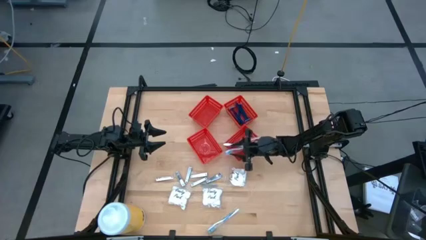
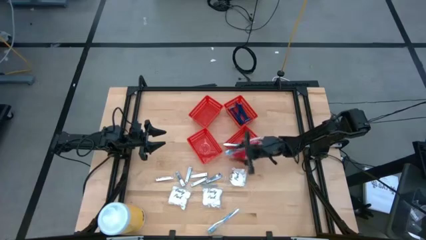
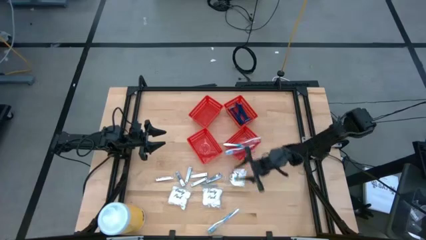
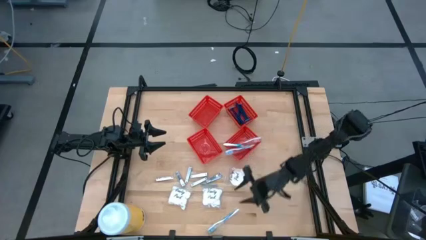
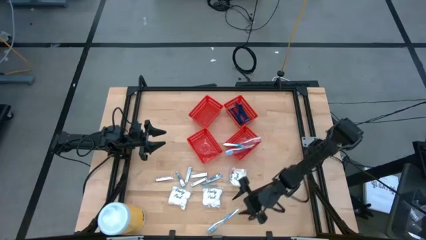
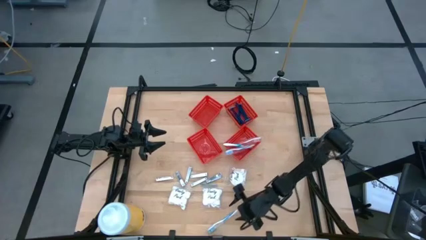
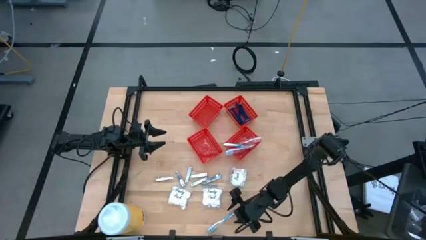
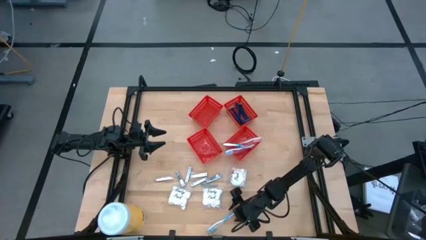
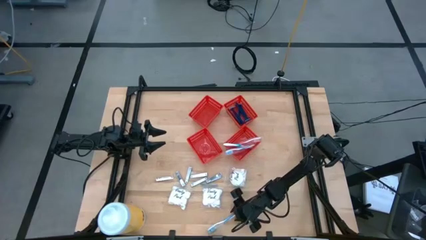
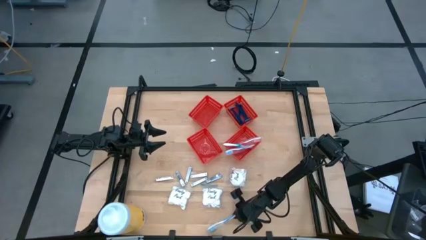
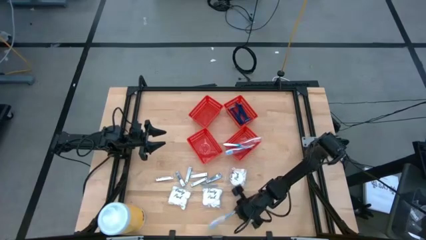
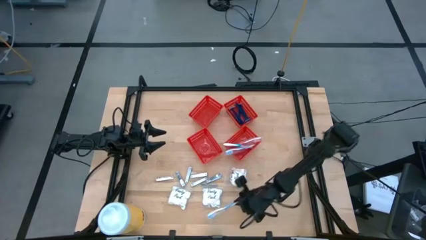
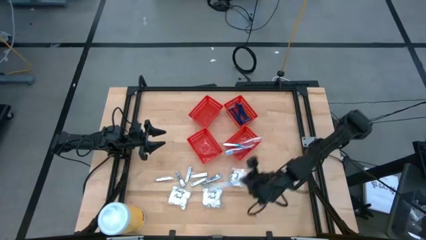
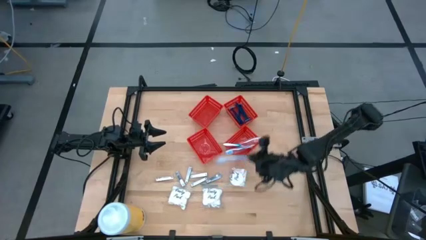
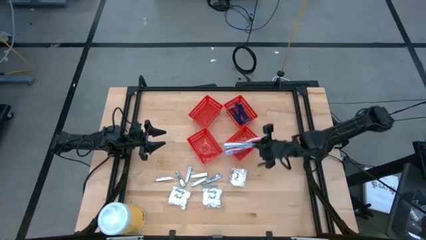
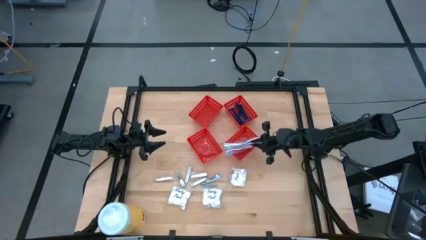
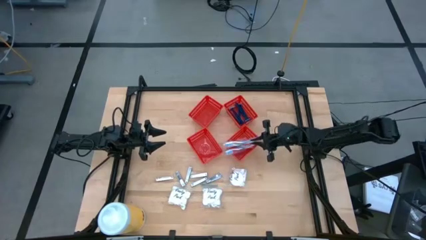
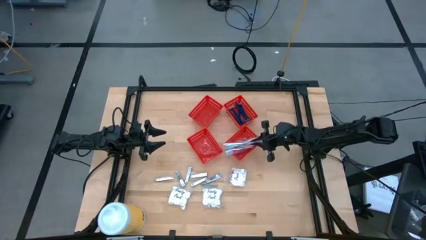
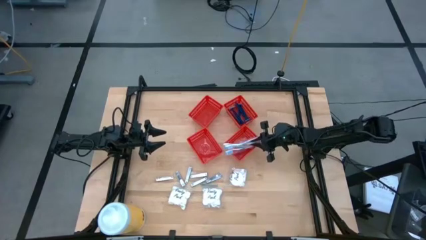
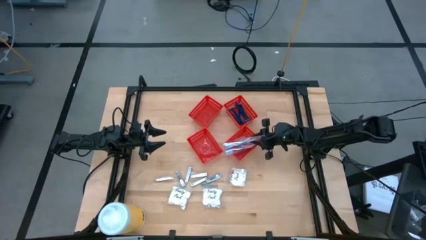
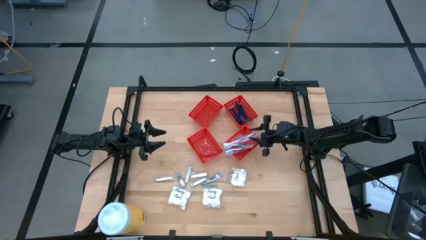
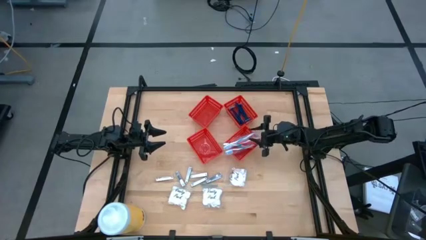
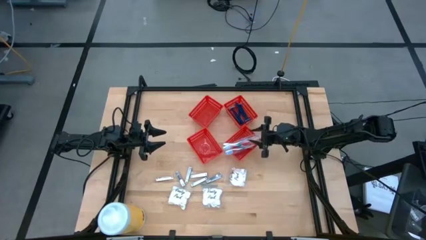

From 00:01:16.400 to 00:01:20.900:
Task: Pick & Place Travel size toiletries
Put the blue toothbrush into the bottom right red bin

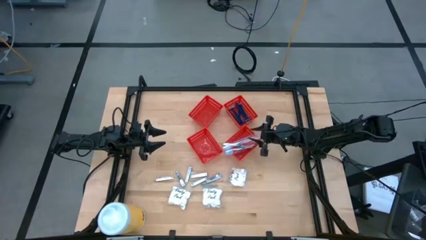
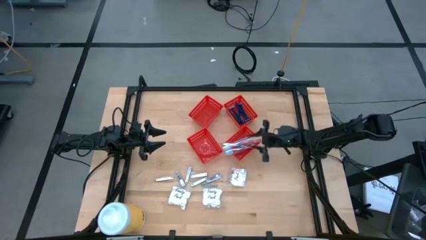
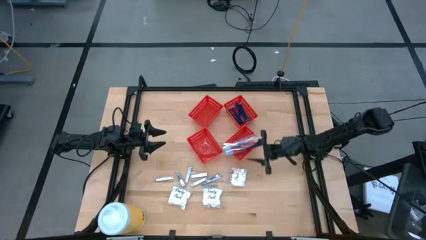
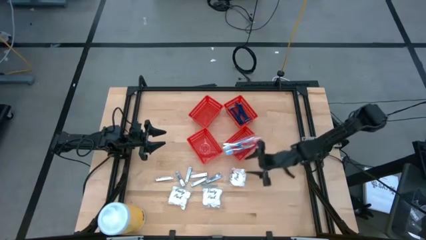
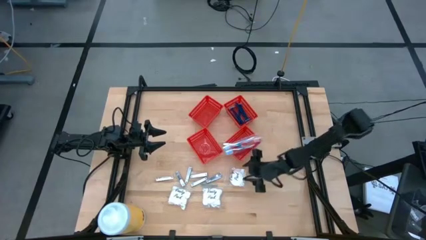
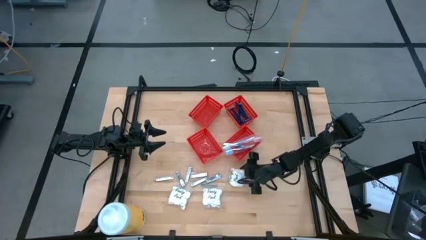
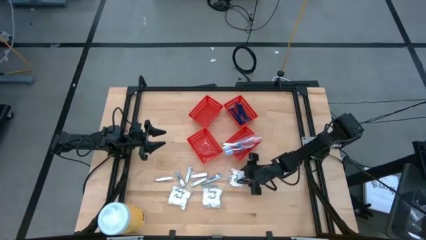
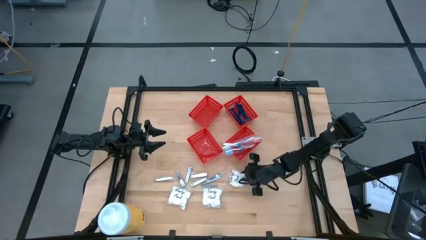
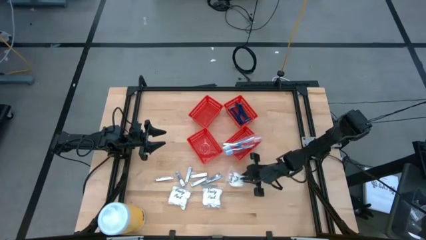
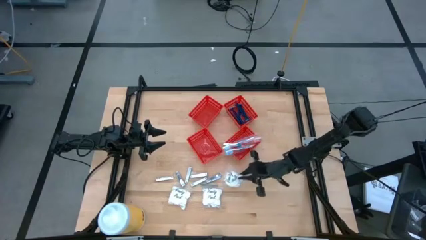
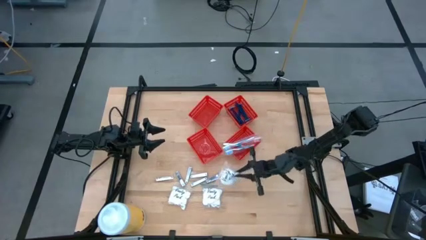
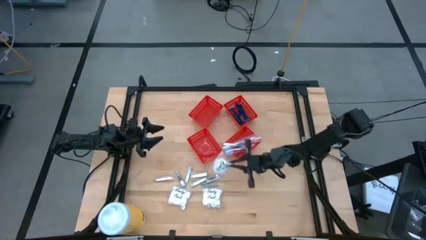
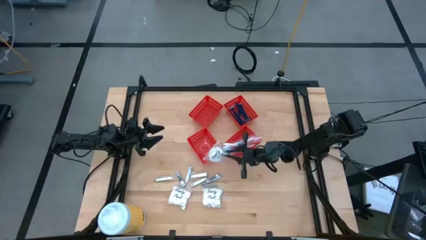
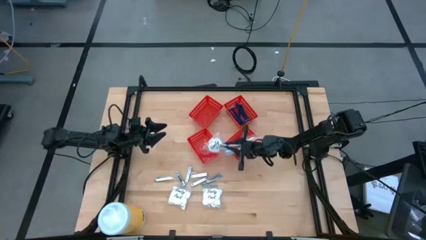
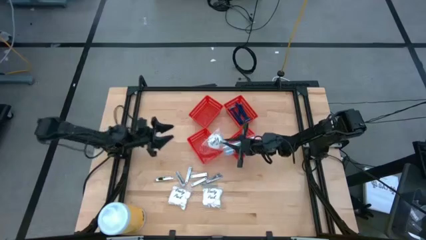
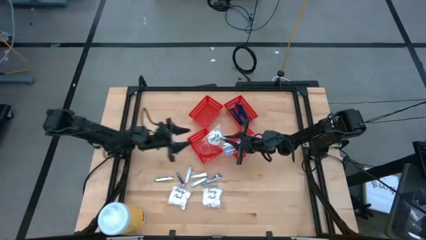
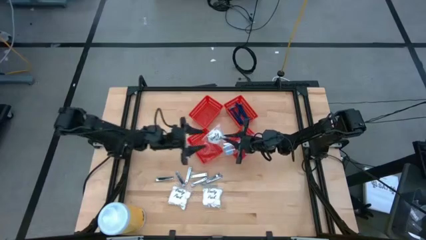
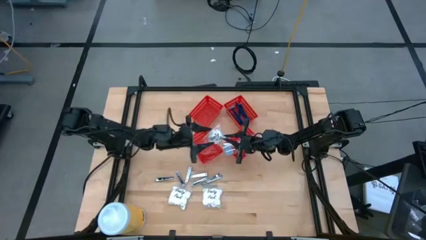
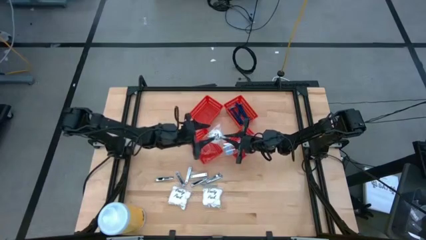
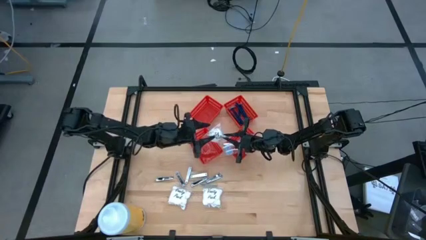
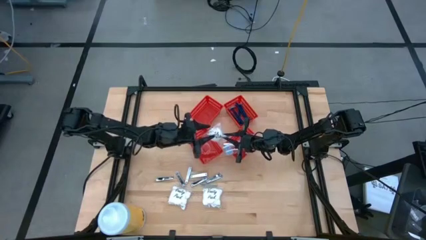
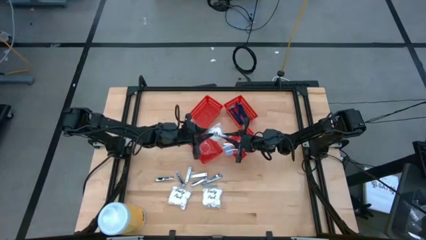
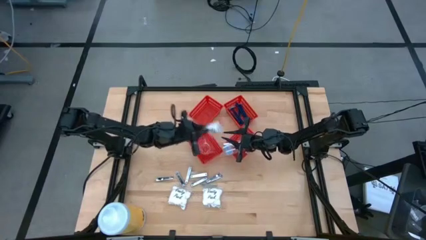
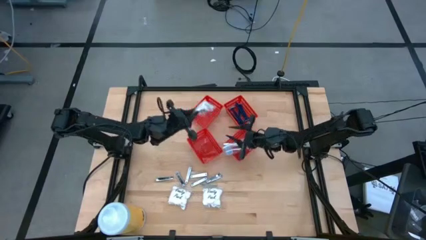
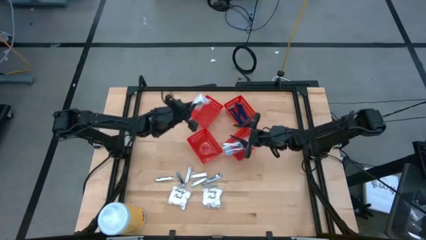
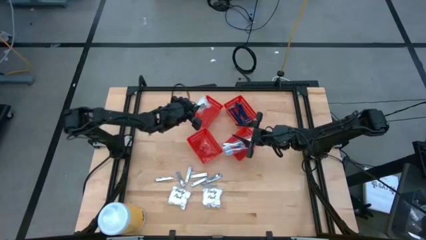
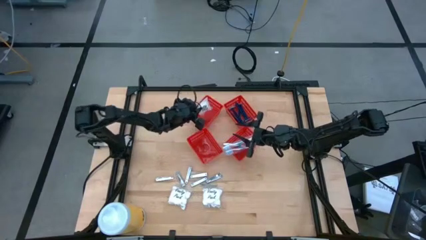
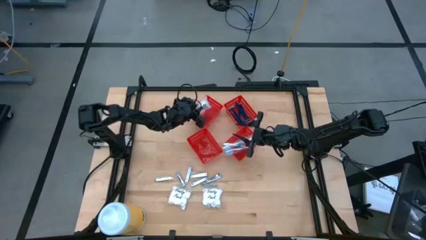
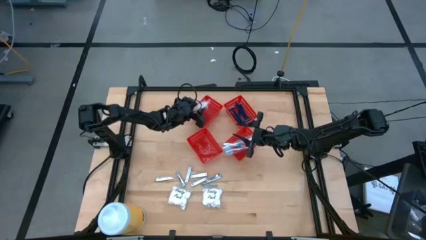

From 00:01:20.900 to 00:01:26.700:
Put the transparent cotton pack into the top left red bin

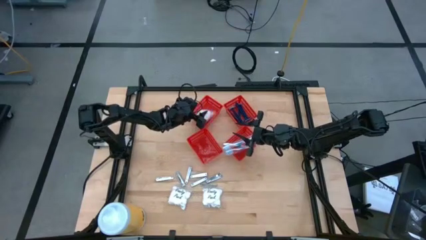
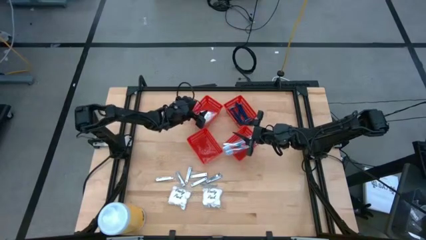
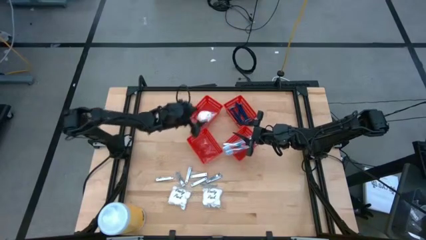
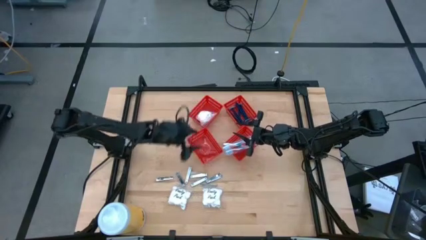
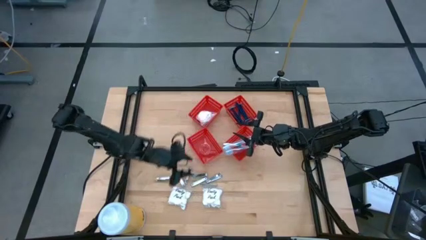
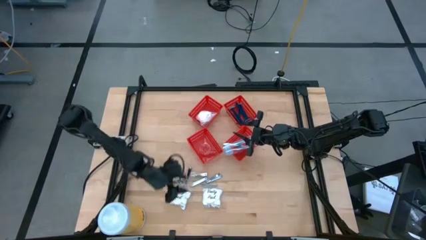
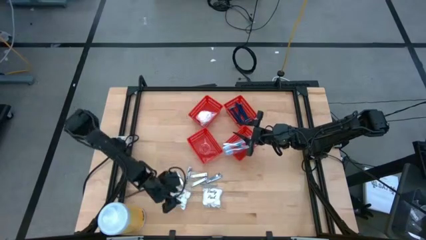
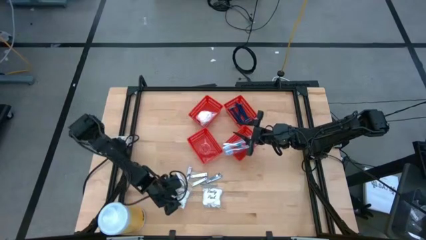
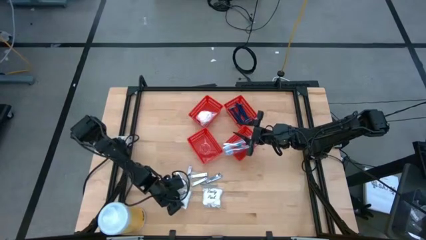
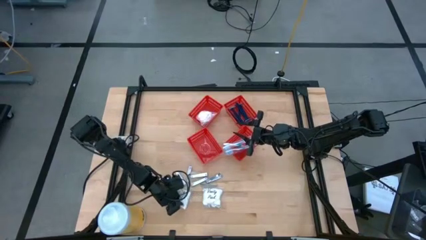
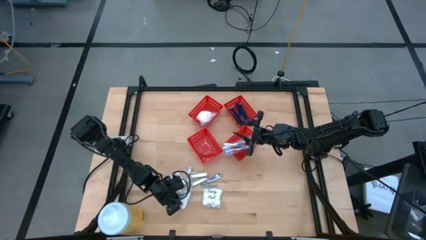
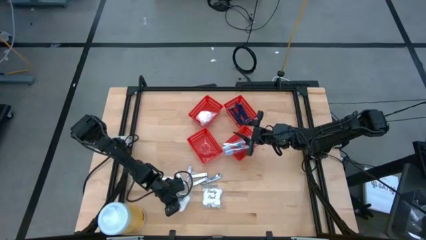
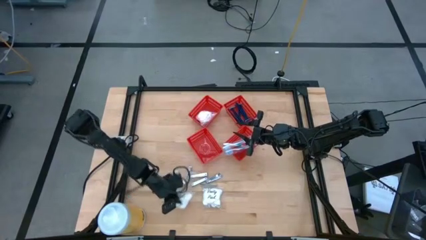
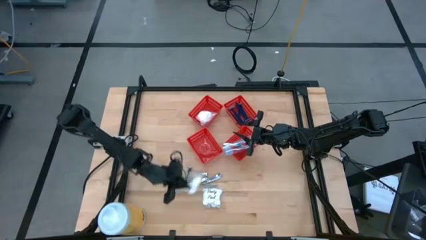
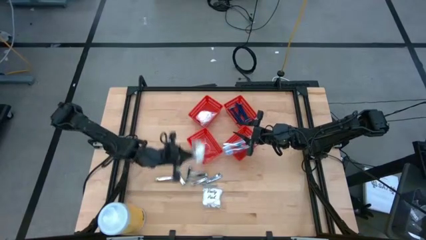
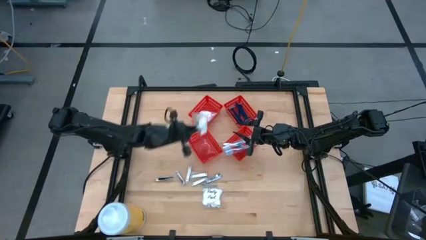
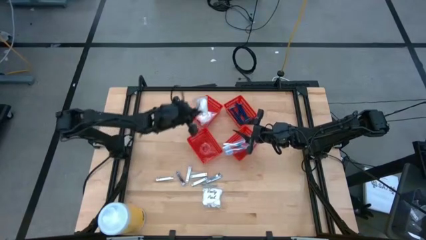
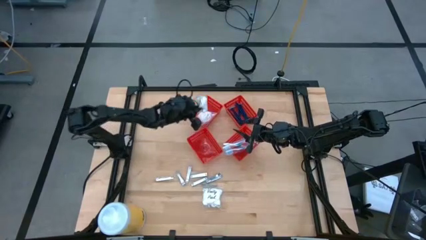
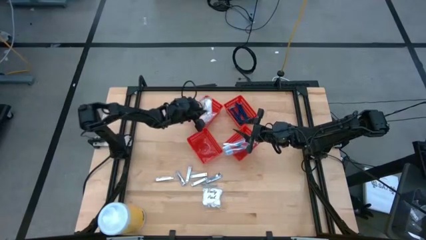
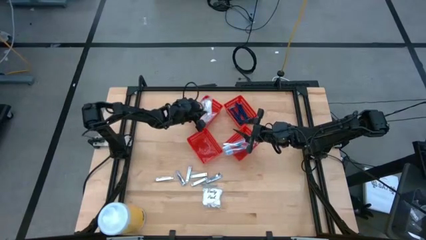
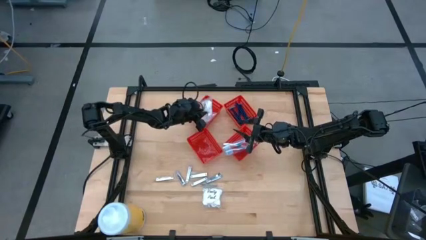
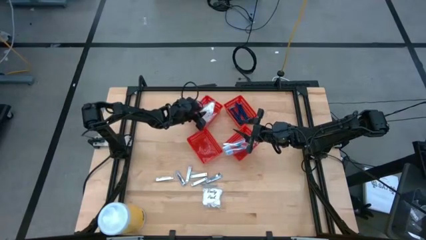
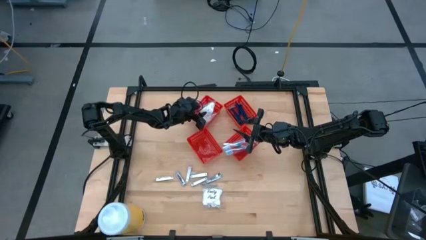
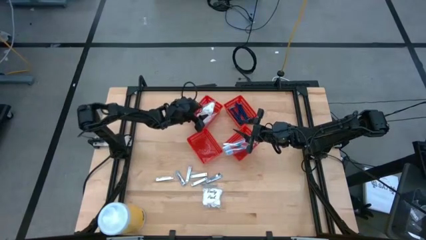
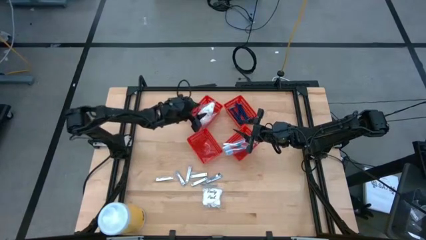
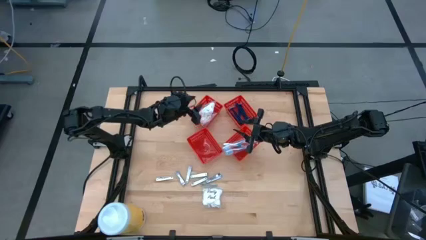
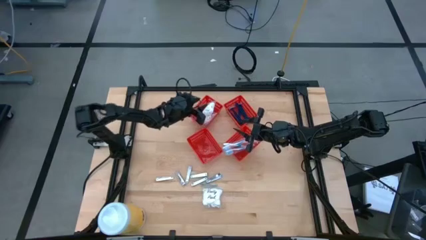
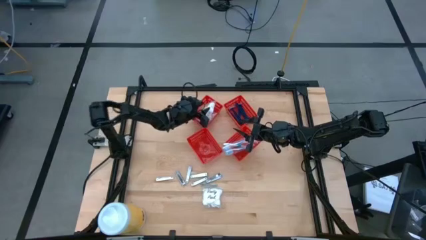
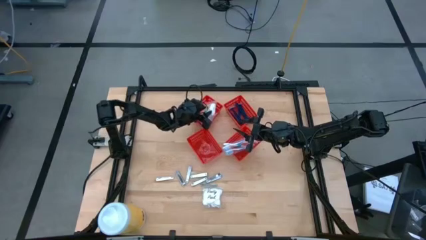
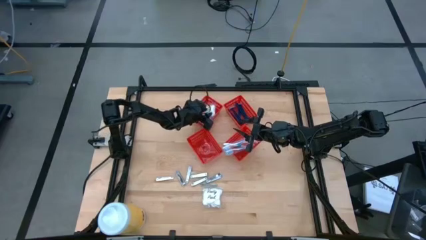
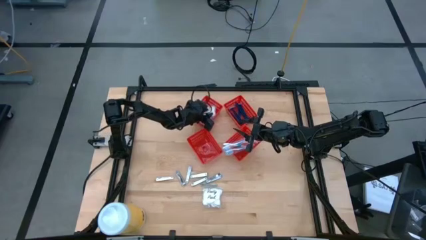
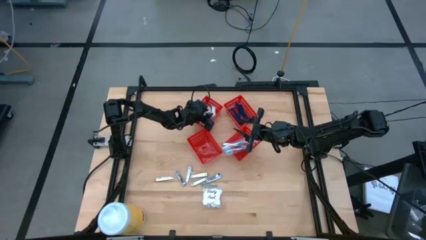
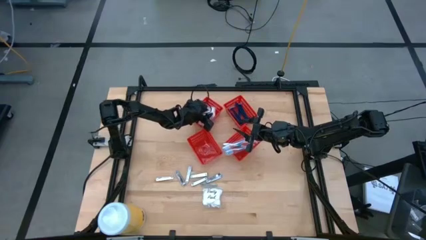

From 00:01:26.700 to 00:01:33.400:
Put the transparent cotton pack into the top left red bin
